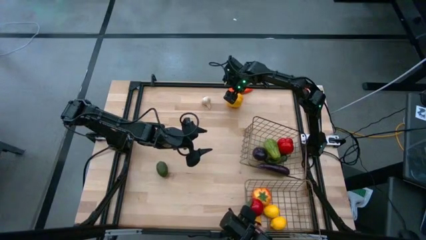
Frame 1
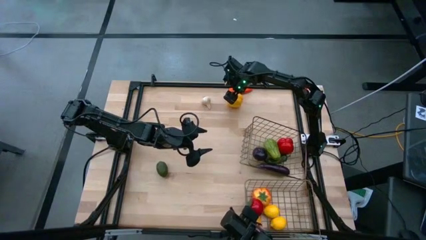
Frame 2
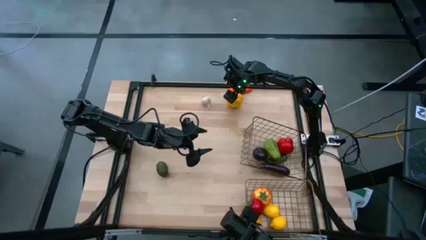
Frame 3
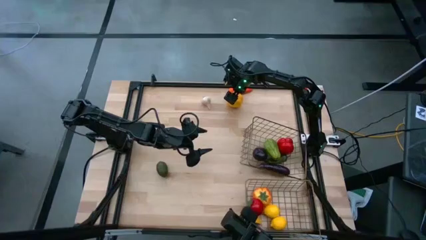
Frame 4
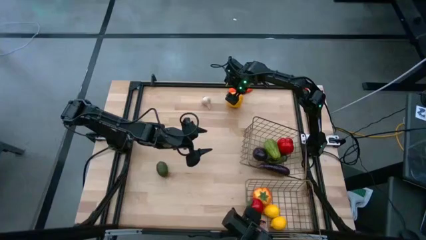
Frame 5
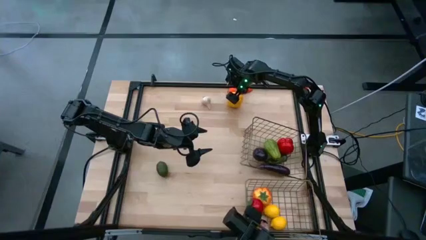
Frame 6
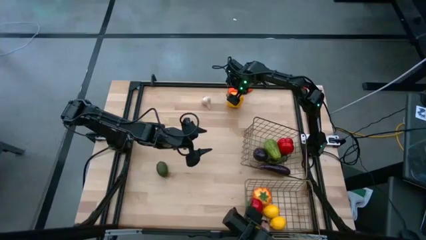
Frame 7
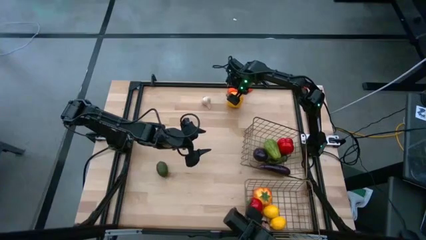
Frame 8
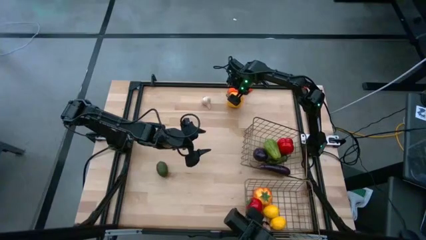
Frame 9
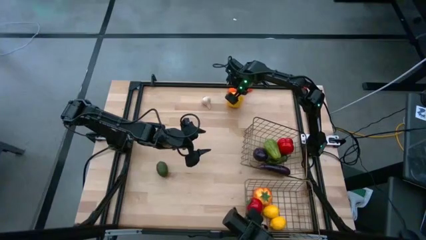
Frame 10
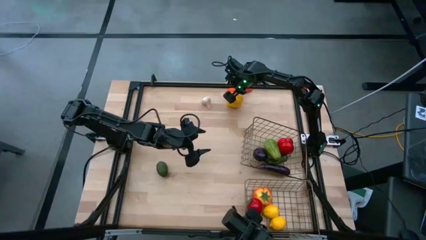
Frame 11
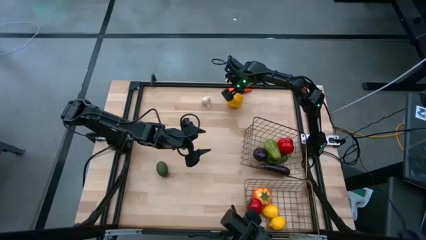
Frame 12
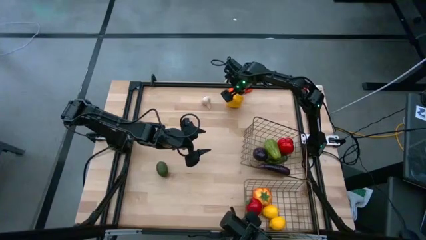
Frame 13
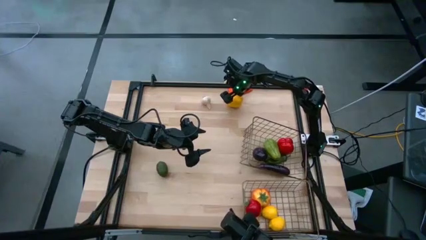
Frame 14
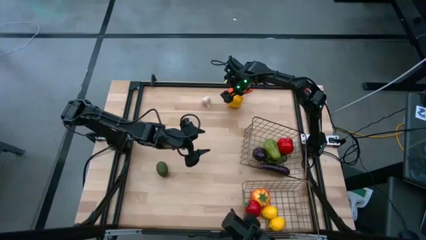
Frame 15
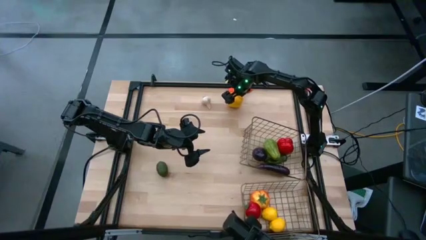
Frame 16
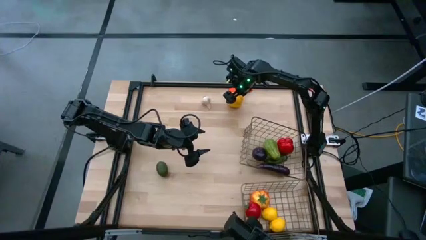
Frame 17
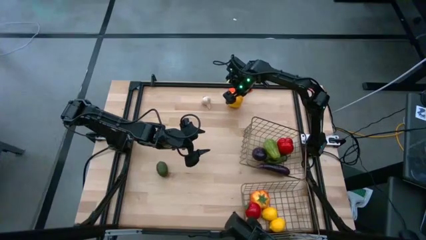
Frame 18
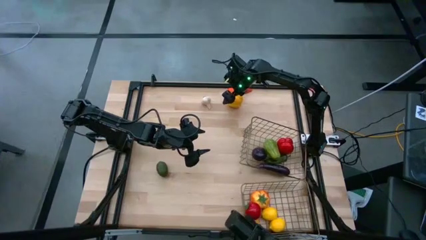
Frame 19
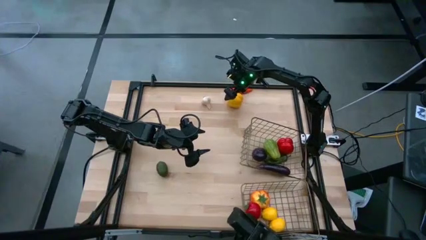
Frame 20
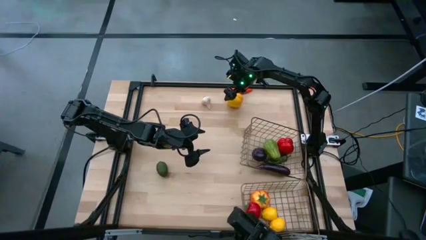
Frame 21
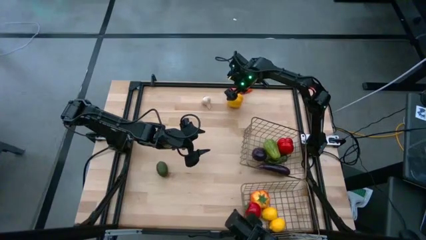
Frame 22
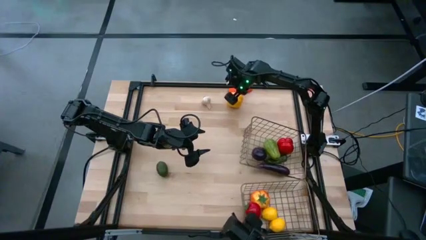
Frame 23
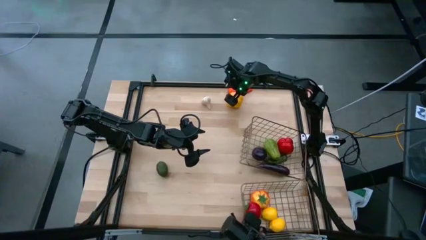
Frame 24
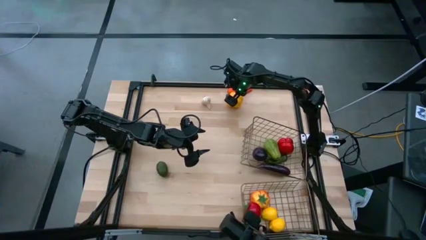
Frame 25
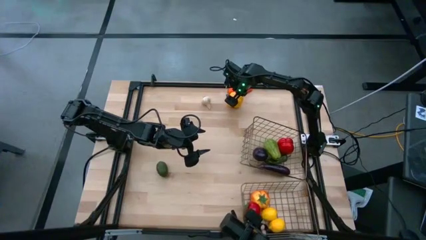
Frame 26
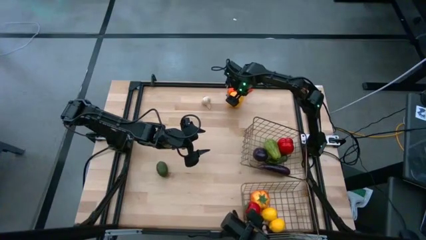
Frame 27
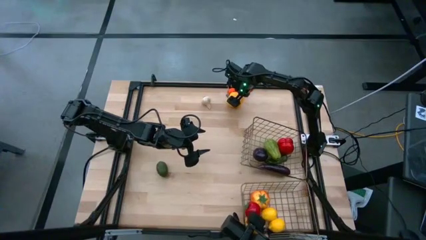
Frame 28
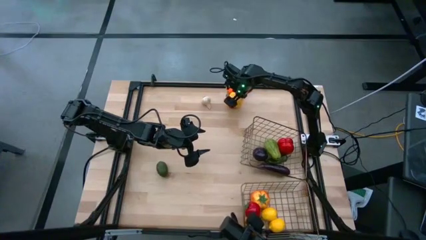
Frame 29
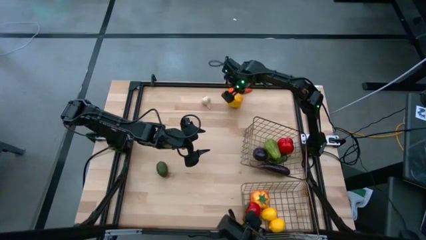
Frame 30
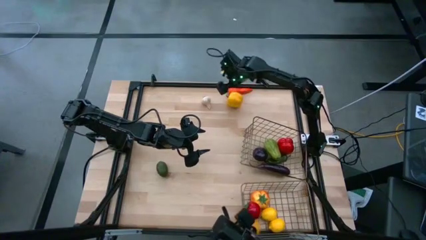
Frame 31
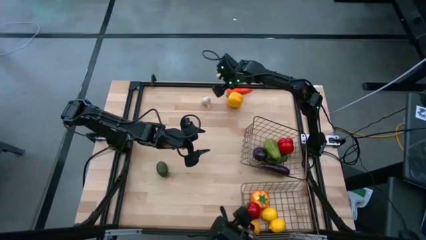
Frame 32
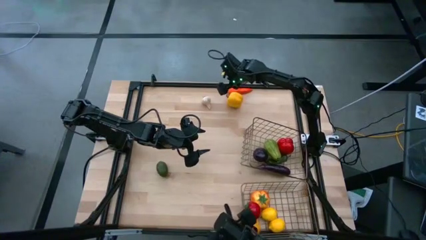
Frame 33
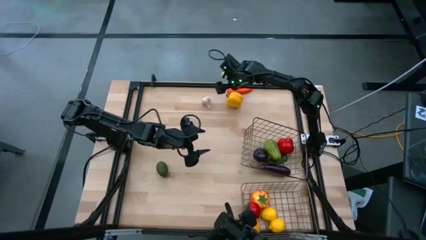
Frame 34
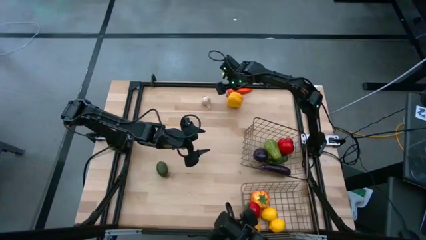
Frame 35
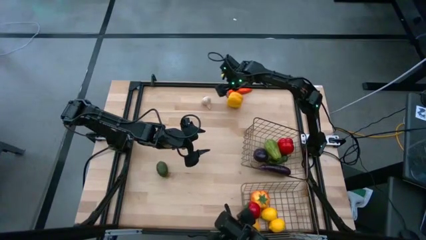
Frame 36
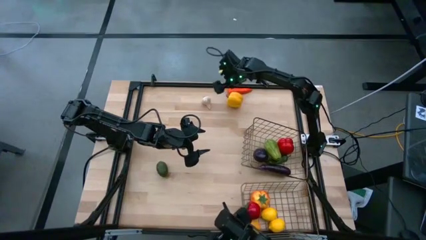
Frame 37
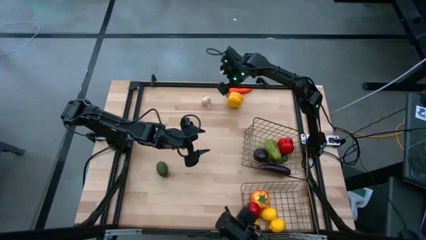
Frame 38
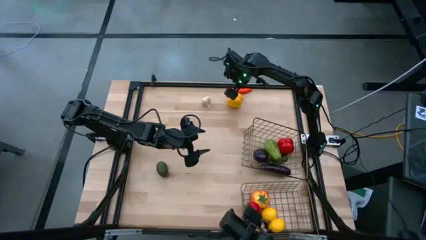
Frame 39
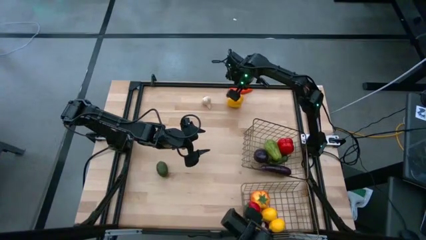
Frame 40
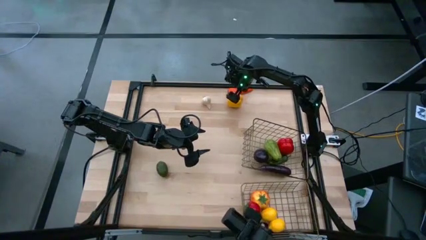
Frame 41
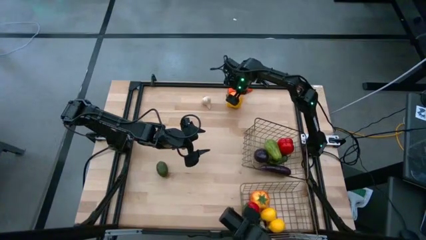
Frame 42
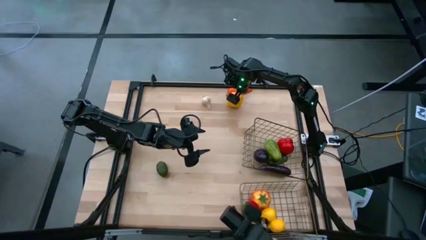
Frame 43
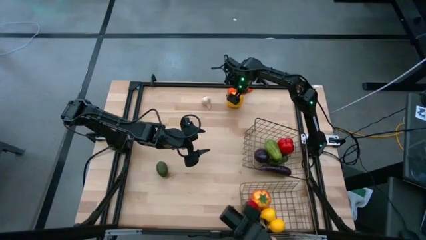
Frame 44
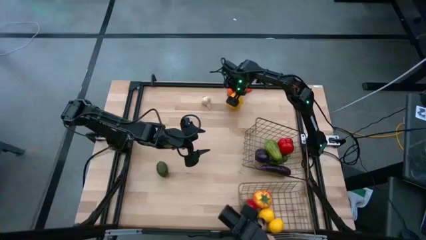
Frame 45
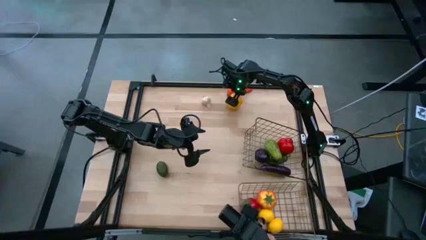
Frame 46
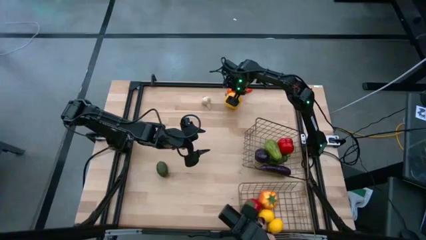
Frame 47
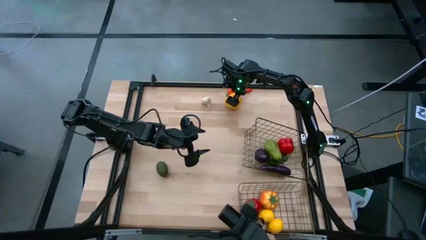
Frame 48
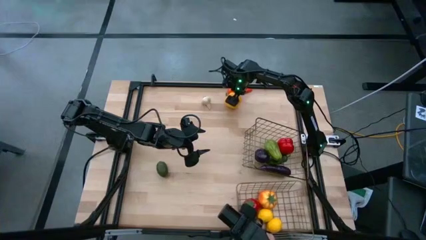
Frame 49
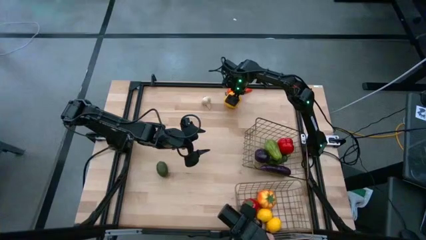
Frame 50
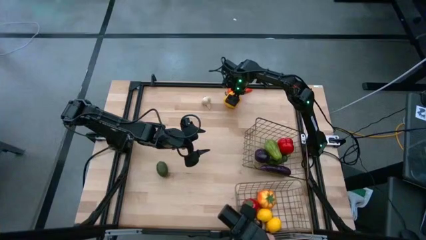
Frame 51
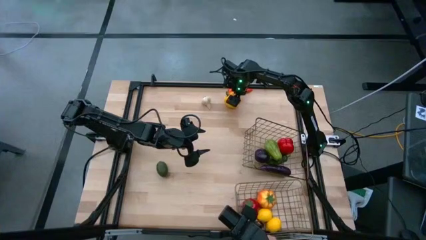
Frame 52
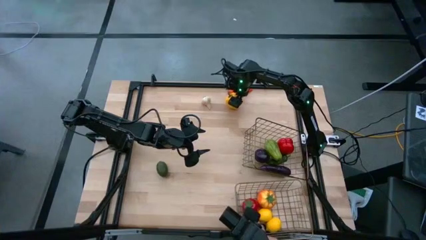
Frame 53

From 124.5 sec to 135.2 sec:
Task: Sort produce into baskets
Put the yellow bell pepper into the top wire basket

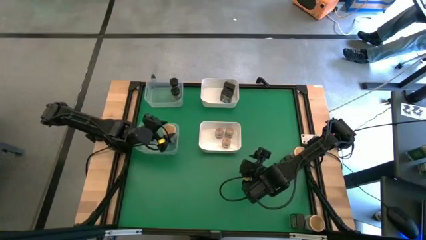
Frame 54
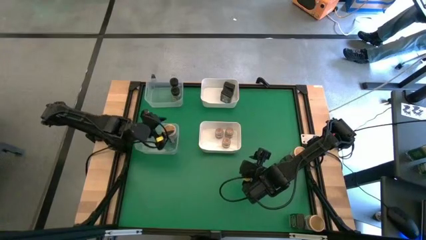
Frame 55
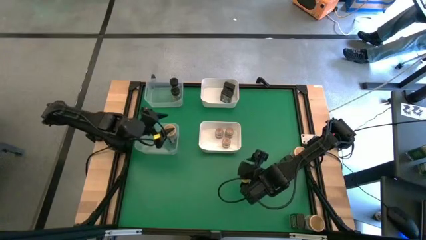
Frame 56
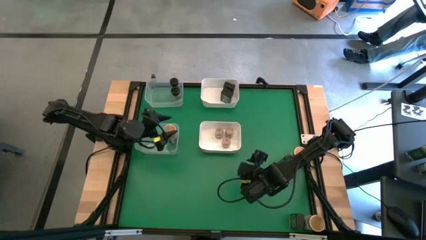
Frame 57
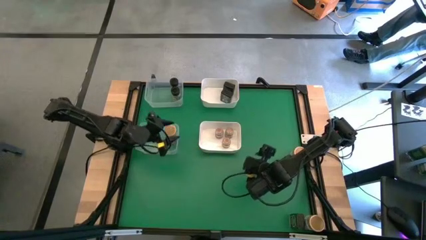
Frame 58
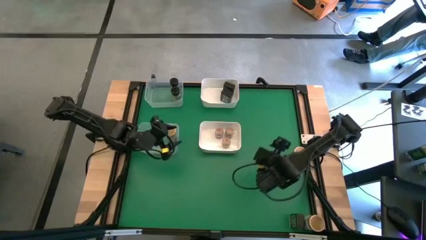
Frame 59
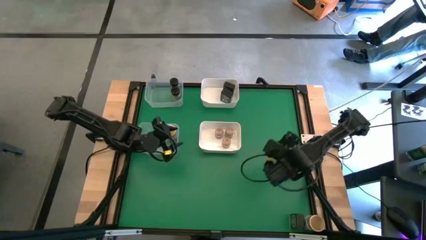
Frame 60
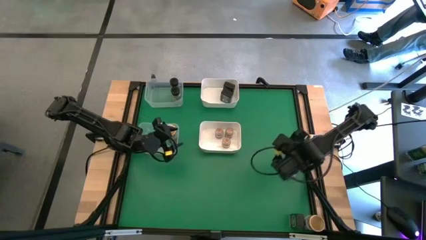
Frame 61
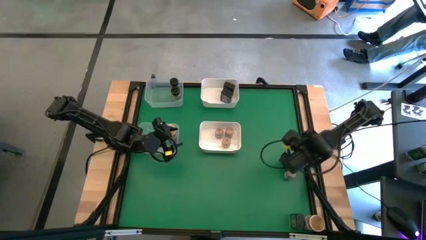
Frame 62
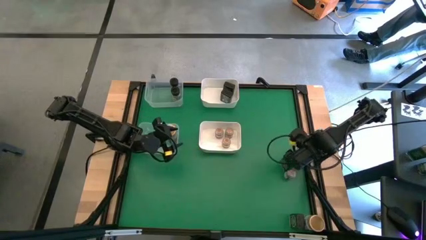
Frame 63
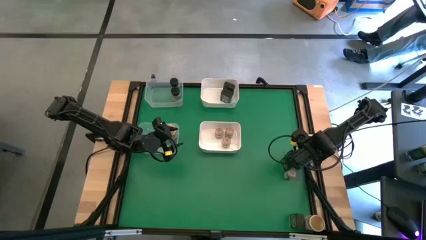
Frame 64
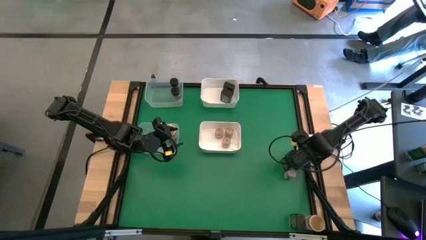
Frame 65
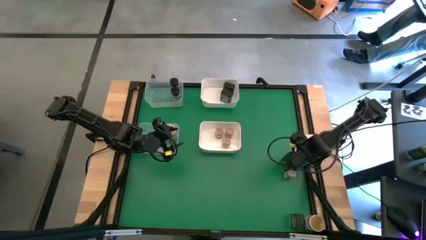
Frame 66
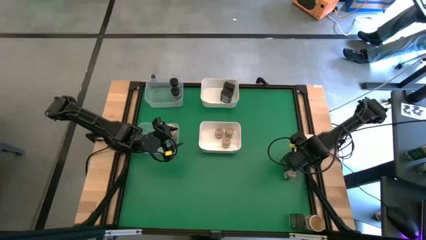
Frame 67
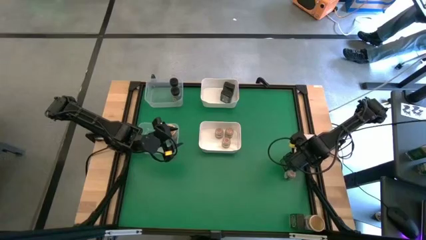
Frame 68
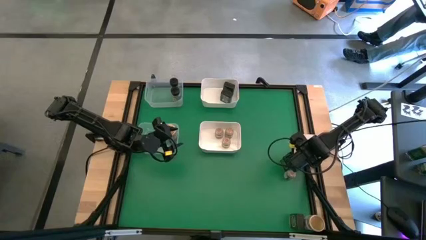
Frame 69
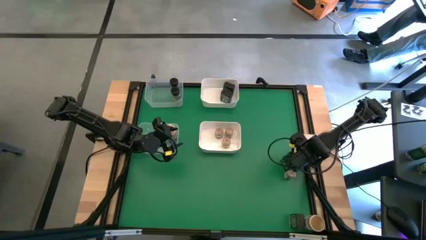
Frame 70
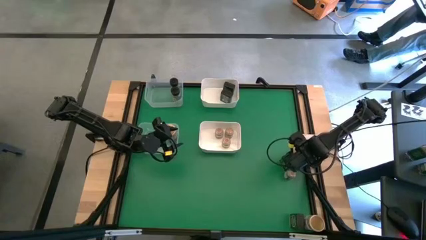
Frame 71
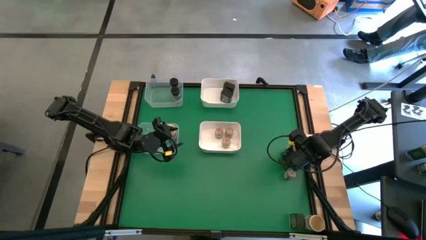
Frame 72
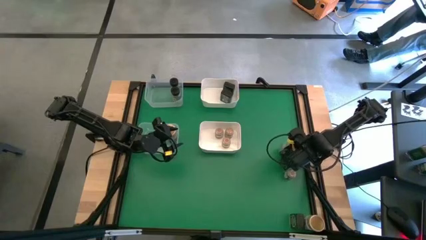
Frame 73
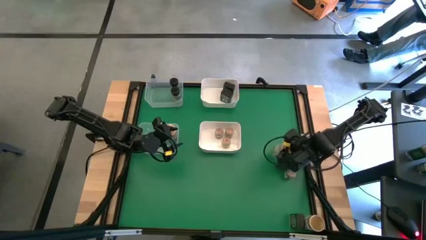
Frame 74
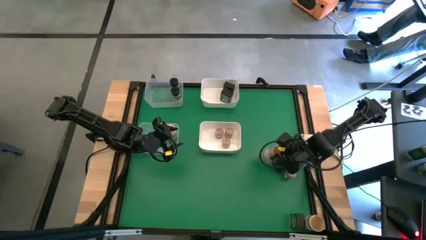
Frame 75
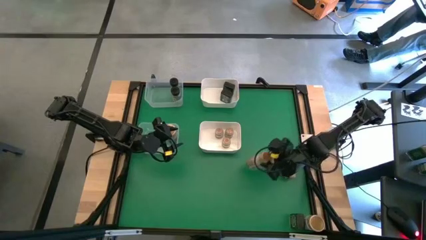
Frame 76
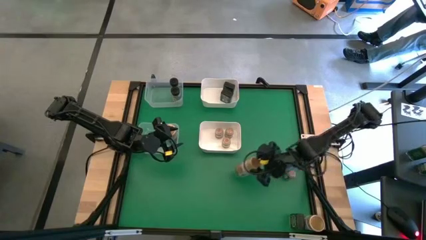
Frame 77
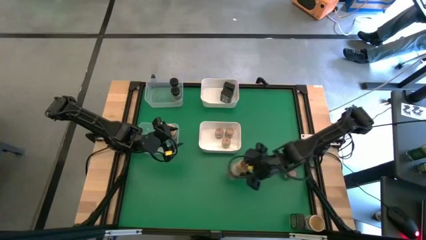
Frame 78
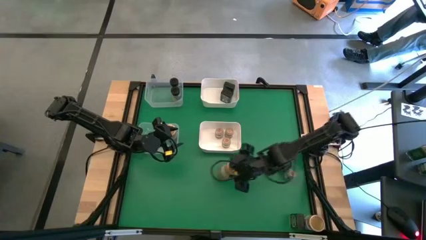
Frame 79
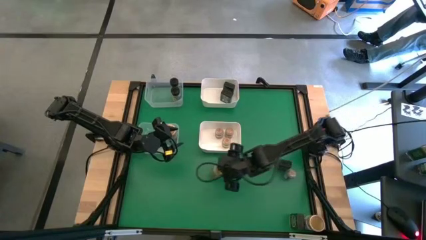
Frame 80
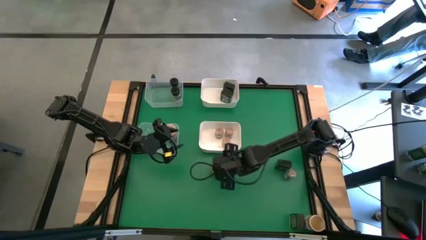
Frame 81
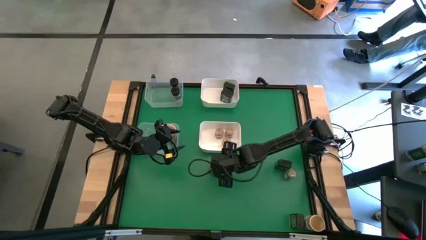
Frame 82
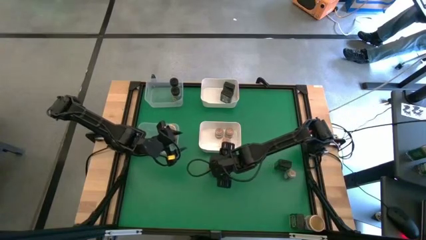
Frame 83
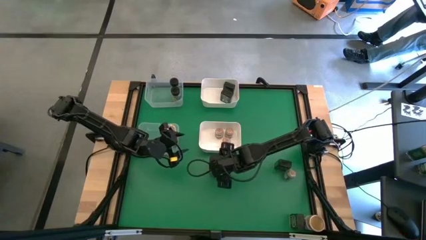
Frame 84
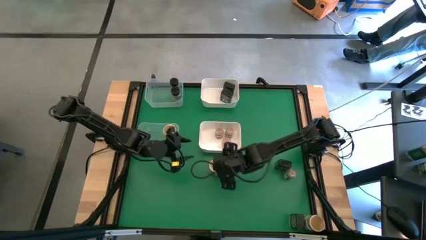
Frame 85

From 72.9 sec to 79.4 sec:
Task: Sort spices by type
Move the top light brown seasoning bottle to the center of the table
